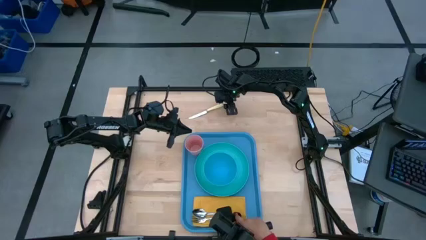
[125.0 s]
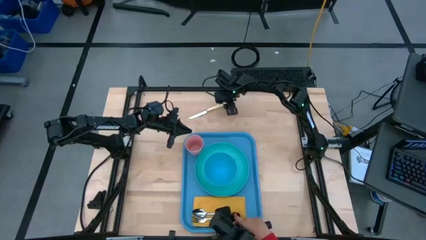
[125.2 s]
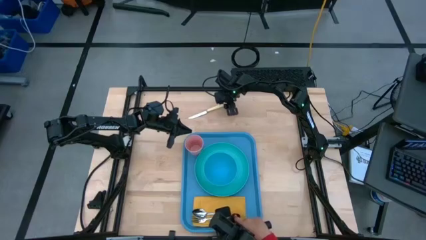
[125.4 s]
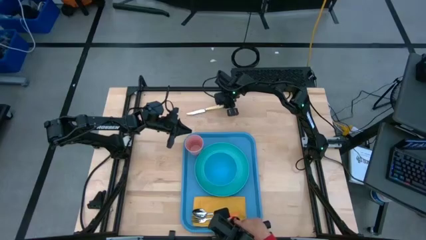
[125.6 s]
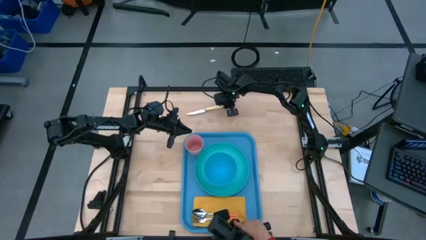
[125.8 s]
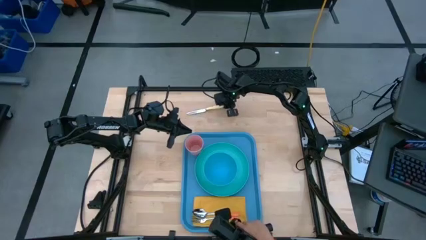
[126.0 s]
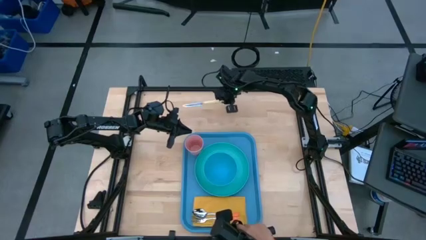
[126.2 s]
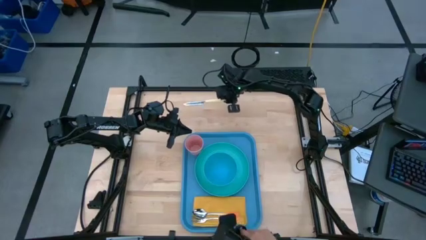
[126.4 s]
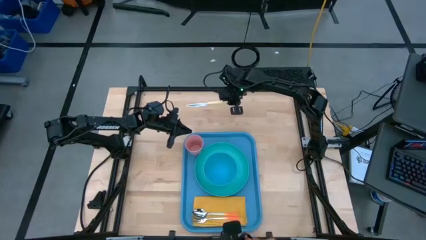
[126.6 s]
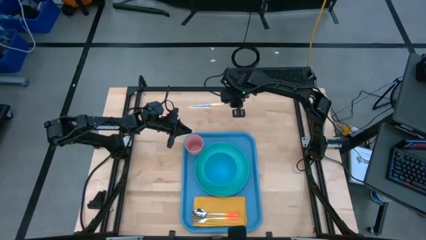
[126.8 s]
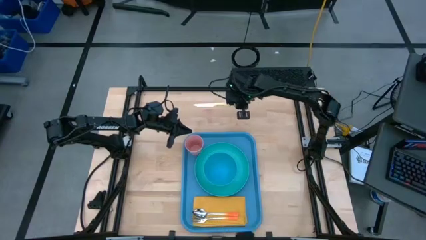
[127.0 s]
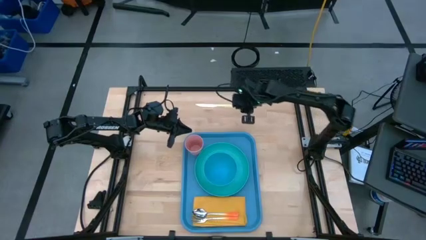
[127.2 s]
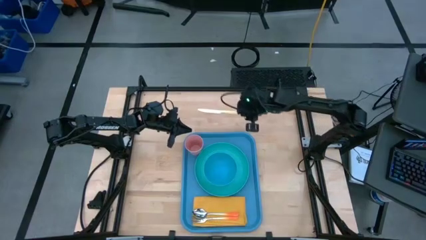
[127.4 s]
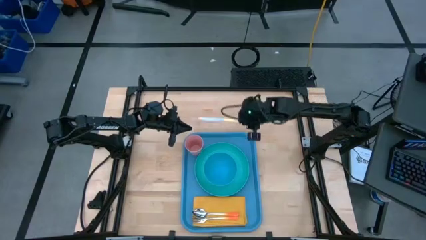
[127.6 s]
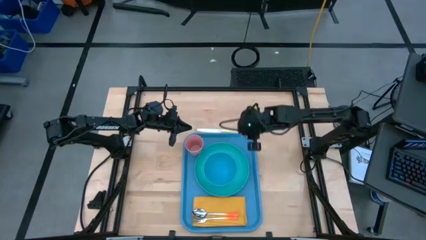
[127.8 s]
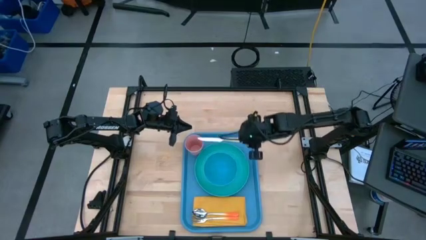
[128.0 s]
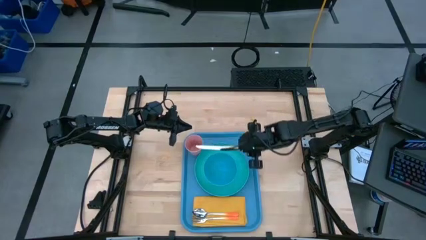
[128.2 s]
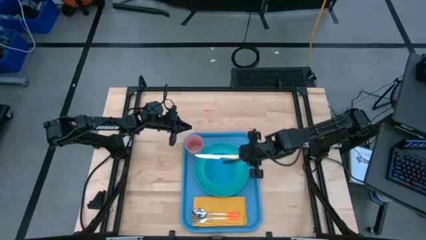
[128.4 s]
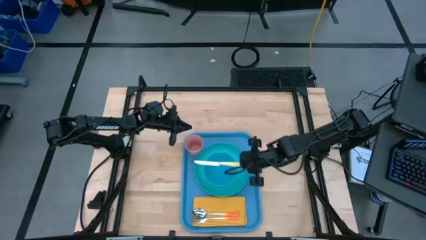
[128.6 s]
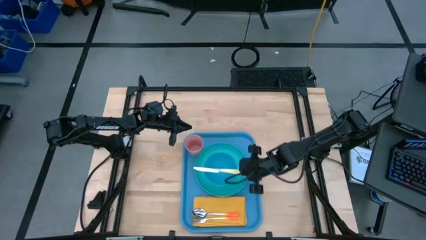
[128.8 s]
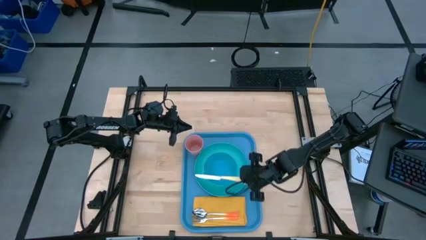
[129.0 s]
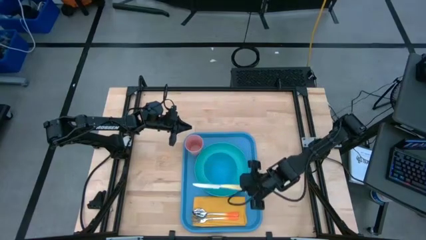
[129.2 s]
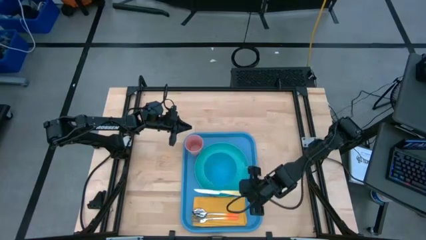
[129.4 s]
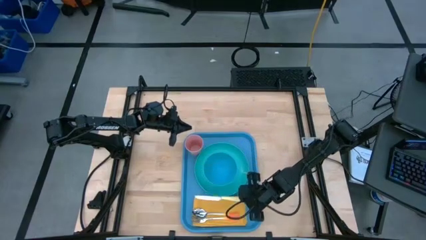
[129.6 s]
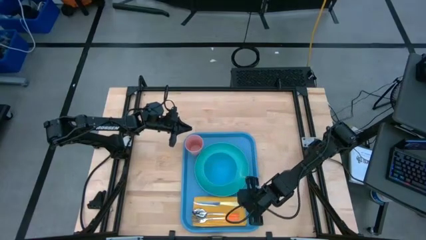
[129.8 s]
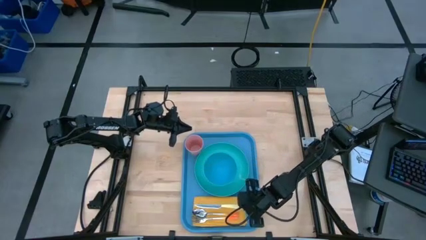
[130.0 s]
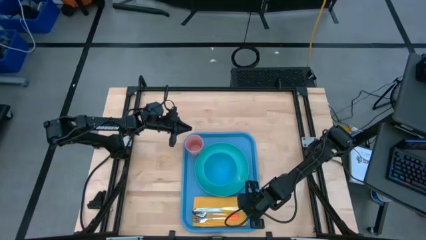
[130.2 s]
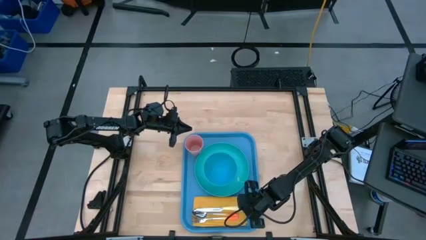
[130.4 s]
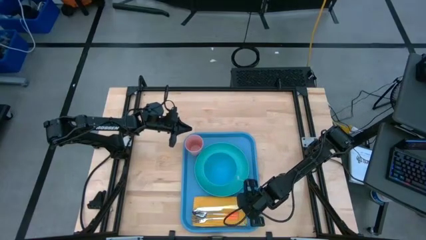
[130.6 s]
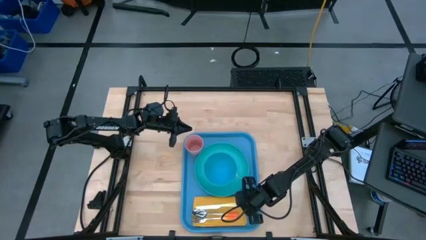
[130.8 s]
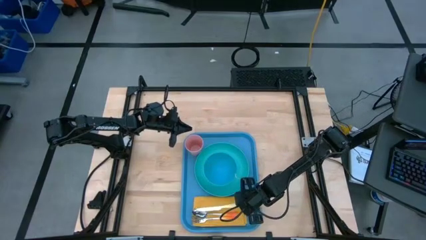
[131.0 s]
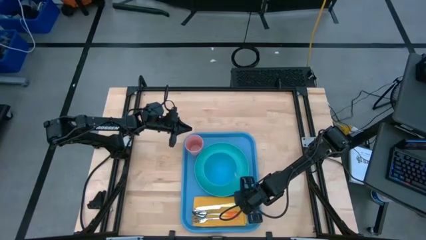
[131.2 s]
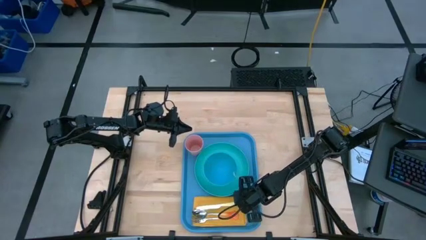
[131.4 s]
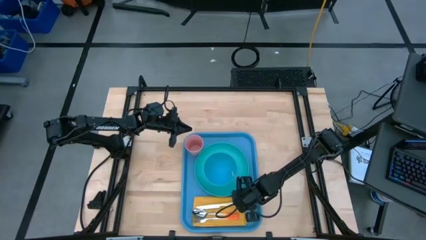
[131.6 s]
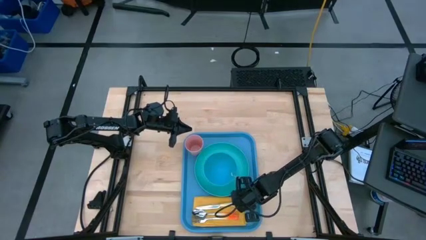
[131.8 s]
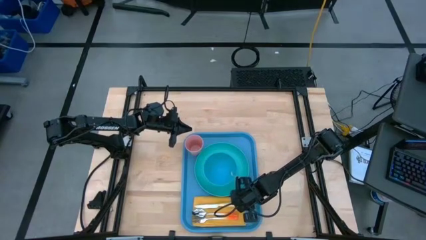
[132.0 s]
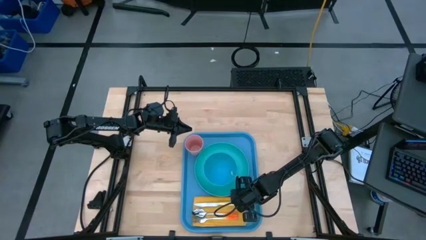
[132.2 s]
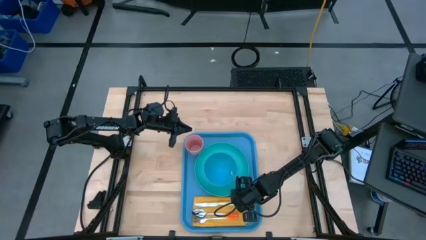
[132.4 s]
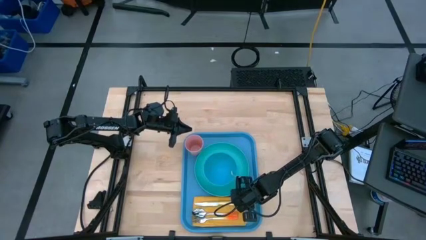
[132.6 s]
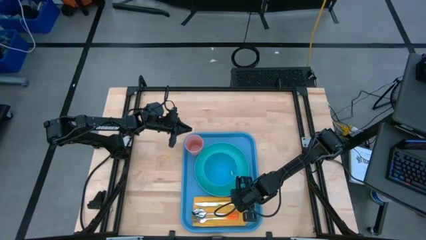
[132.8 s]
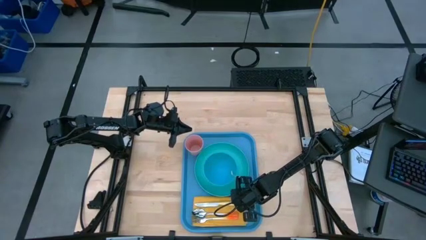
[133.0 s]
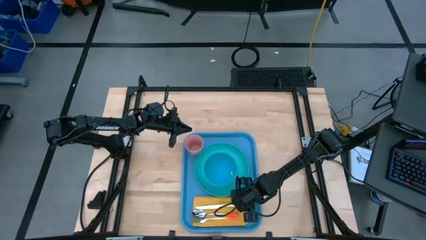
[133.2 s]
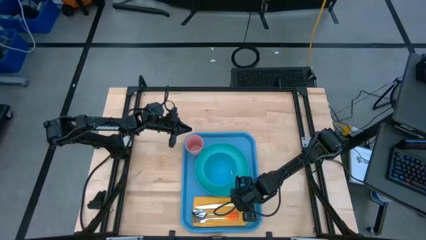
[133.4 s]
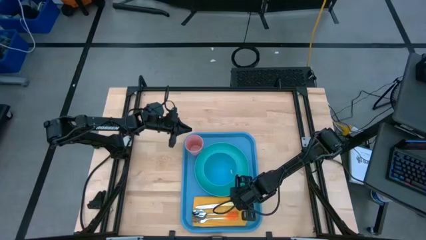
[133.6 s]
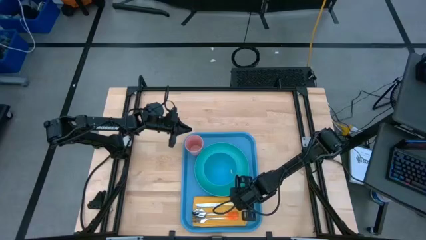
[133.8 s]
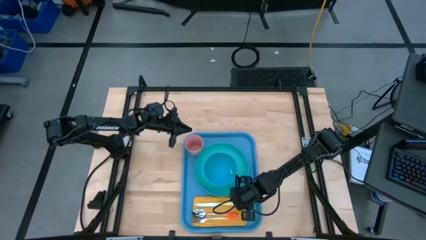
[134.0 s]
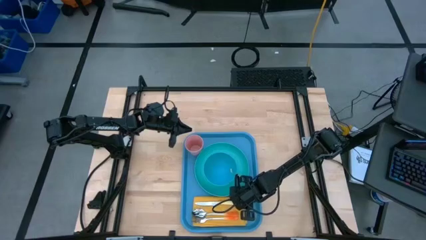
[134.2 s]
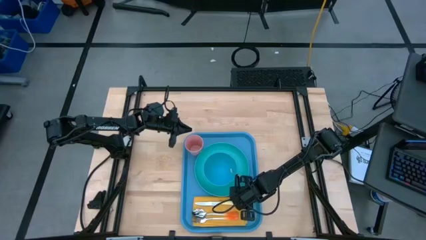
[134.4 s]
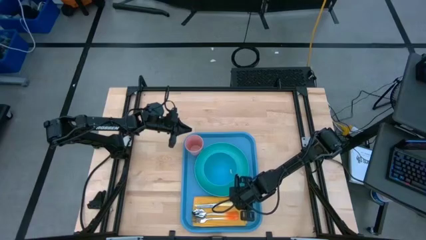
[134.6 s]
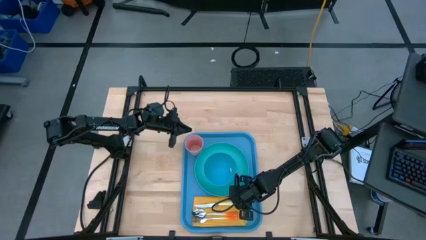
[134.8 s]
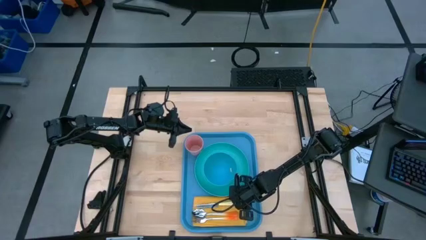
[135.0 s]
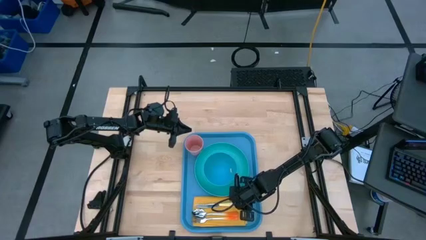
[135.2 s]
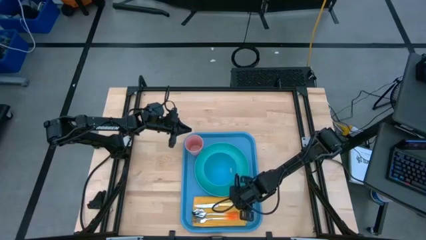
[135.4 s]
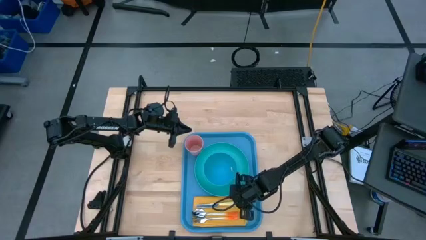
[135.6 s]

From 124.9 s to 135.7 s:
Task: Set up tray
Put the yellow table knife on the yellow table napkin to the top of the orange spoon
